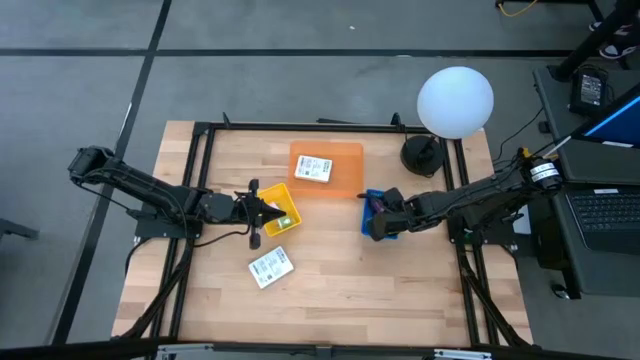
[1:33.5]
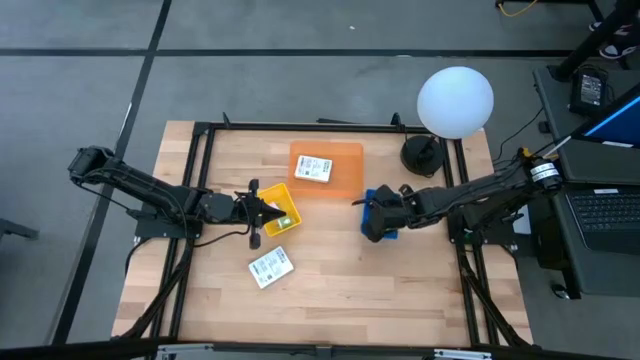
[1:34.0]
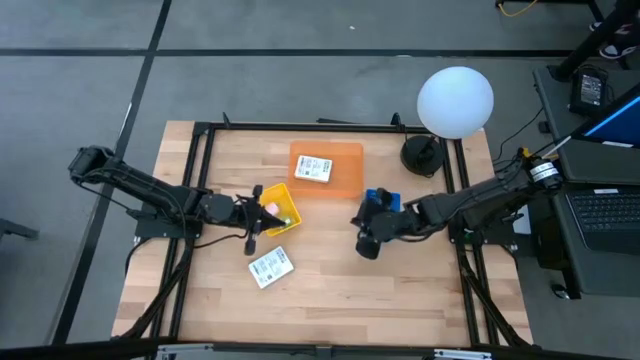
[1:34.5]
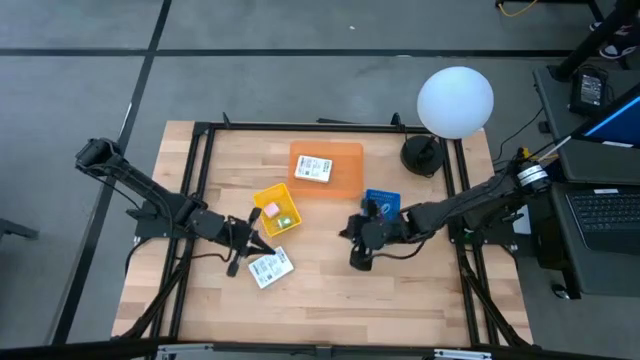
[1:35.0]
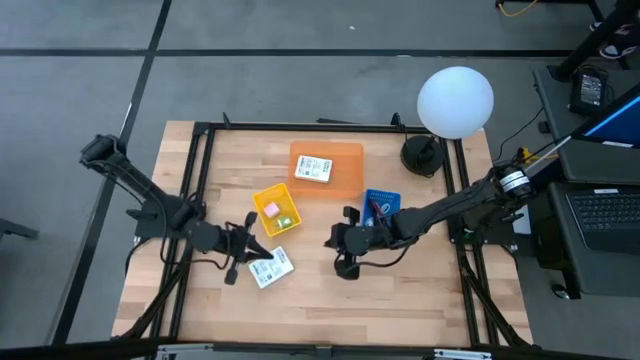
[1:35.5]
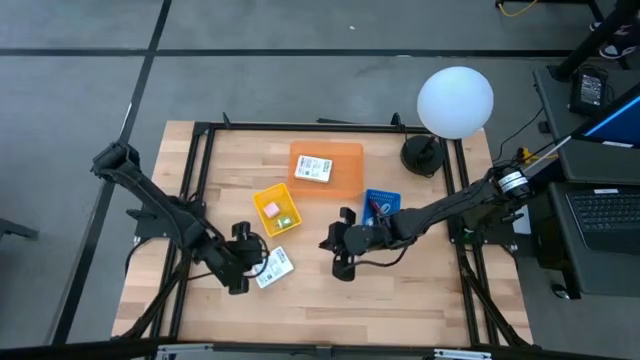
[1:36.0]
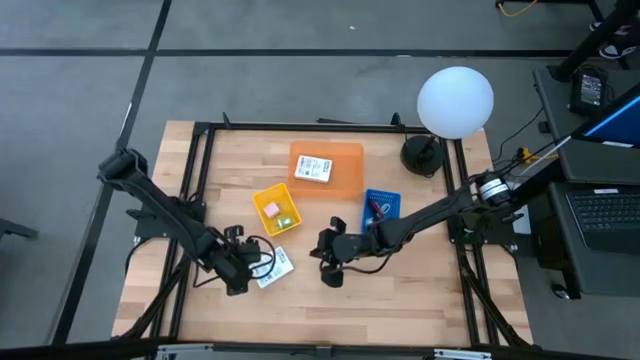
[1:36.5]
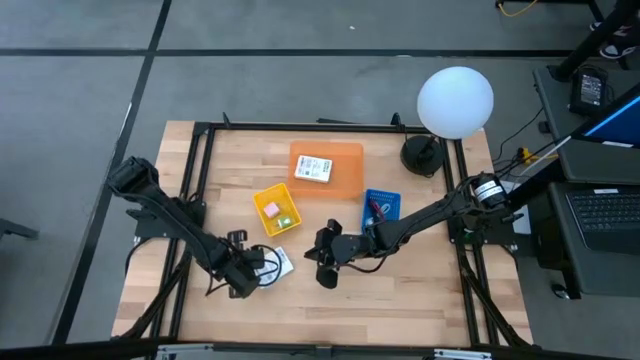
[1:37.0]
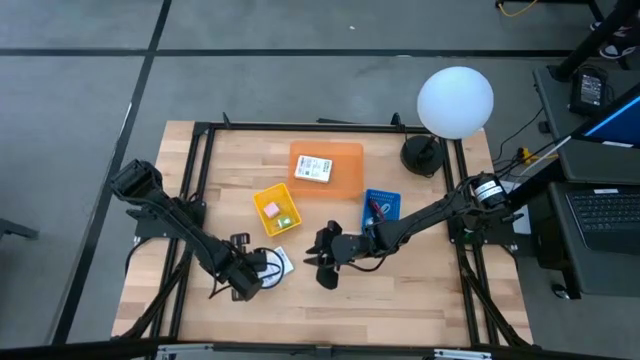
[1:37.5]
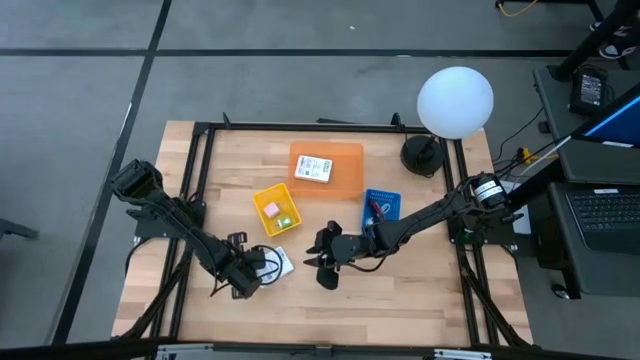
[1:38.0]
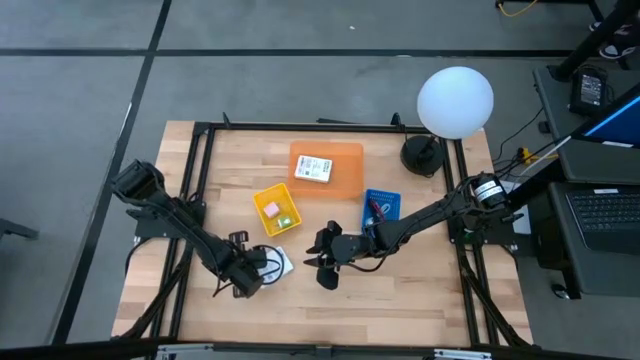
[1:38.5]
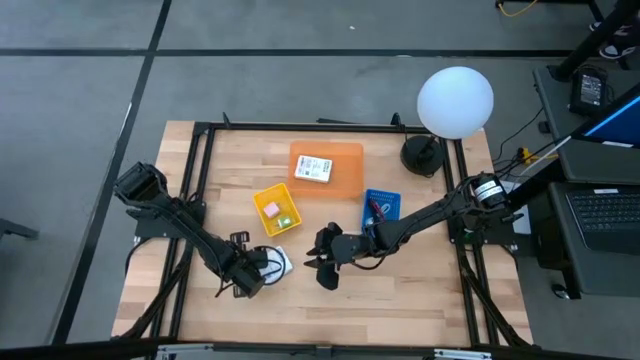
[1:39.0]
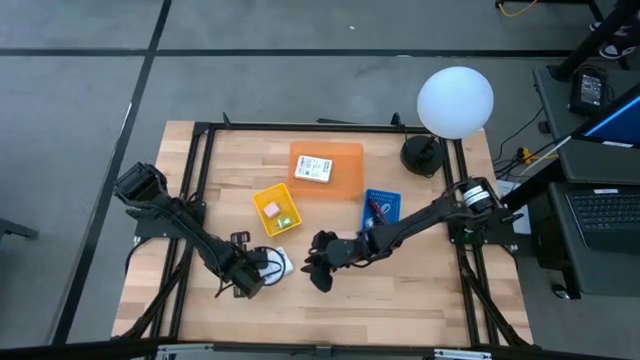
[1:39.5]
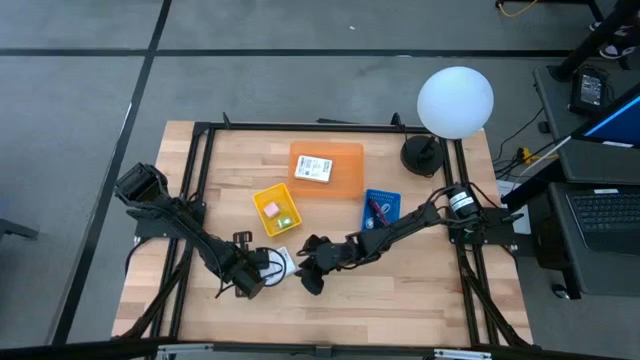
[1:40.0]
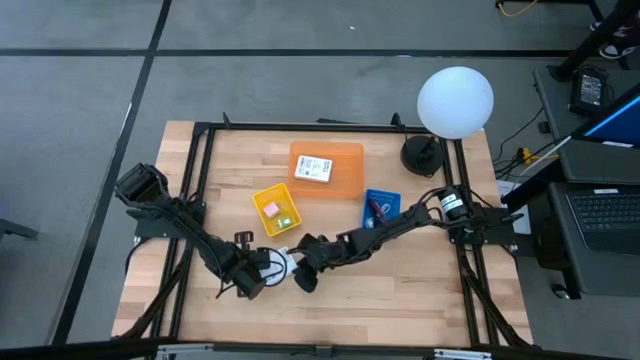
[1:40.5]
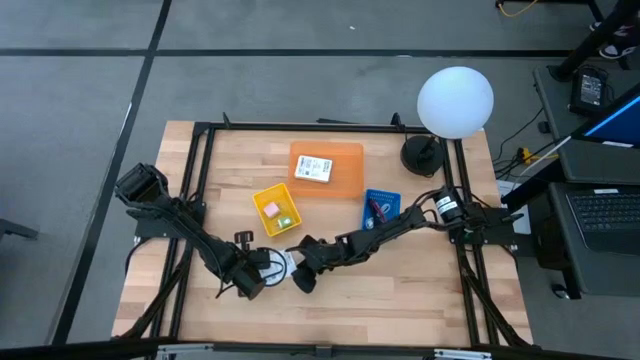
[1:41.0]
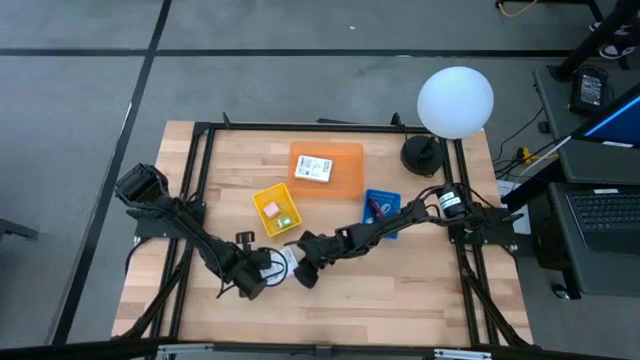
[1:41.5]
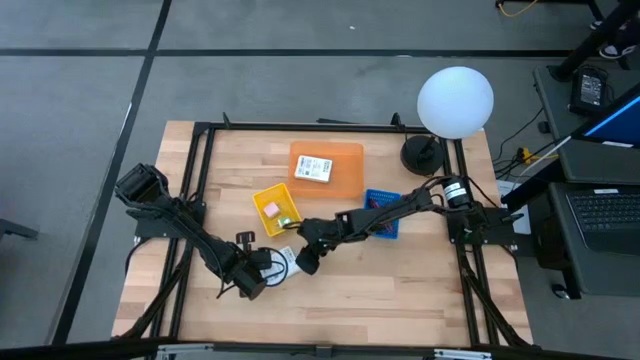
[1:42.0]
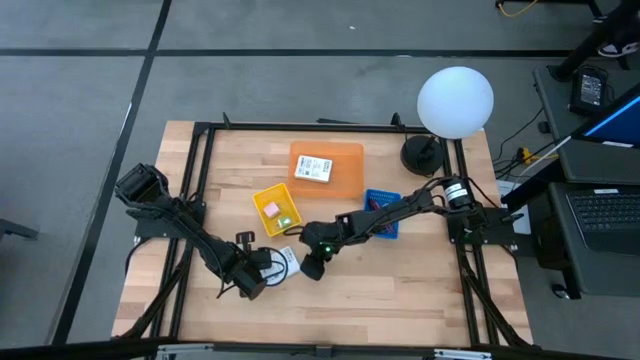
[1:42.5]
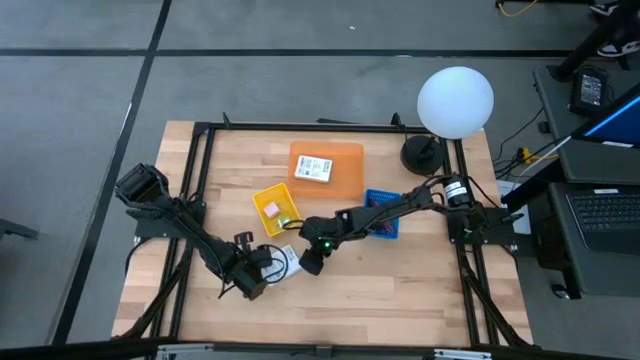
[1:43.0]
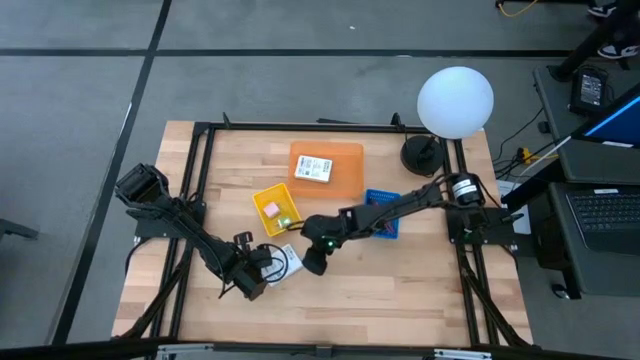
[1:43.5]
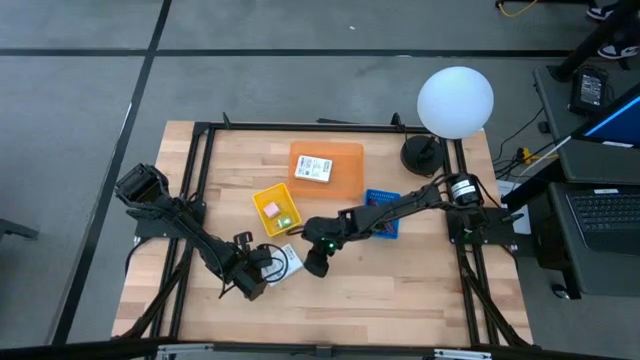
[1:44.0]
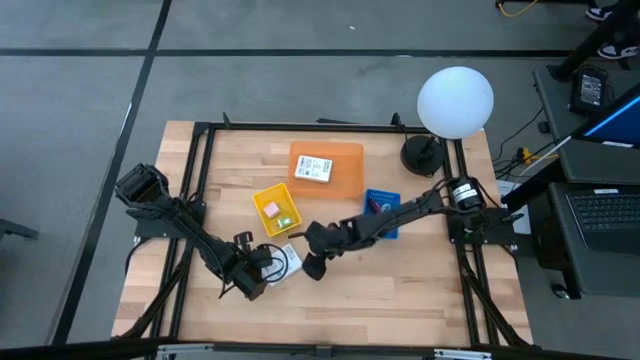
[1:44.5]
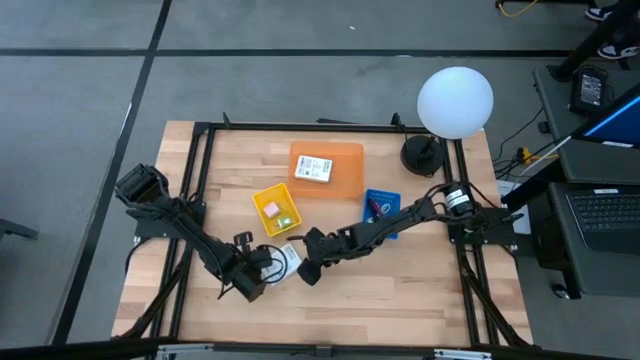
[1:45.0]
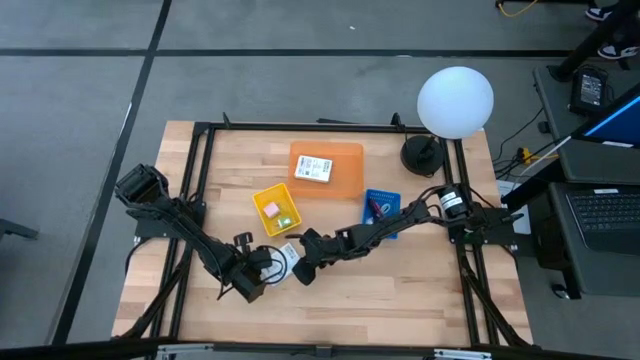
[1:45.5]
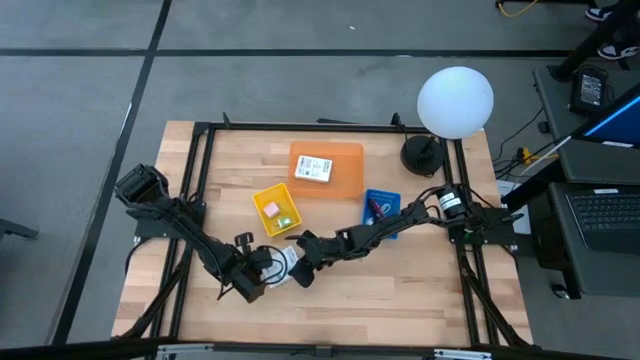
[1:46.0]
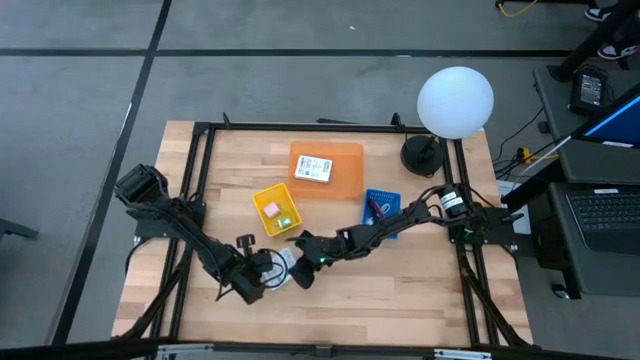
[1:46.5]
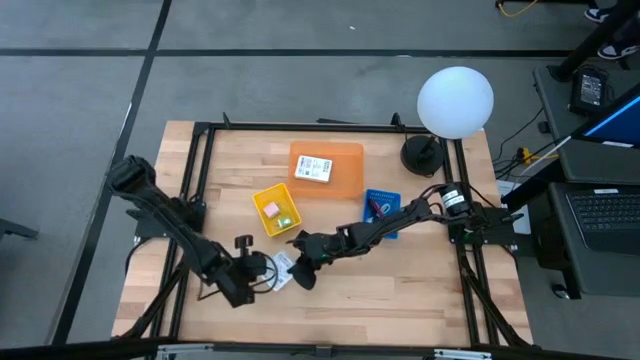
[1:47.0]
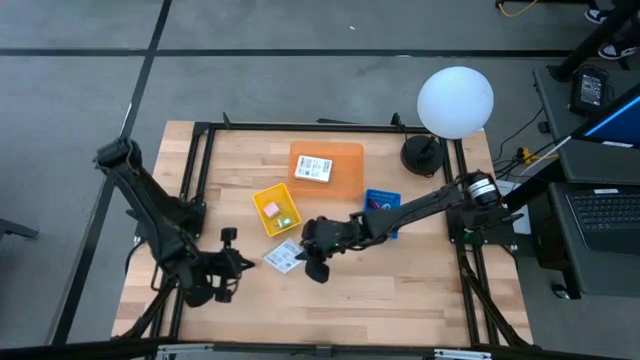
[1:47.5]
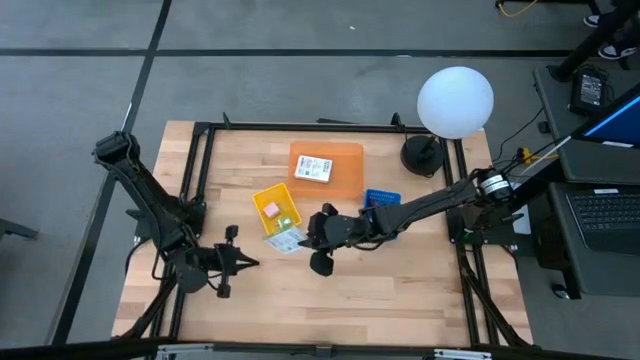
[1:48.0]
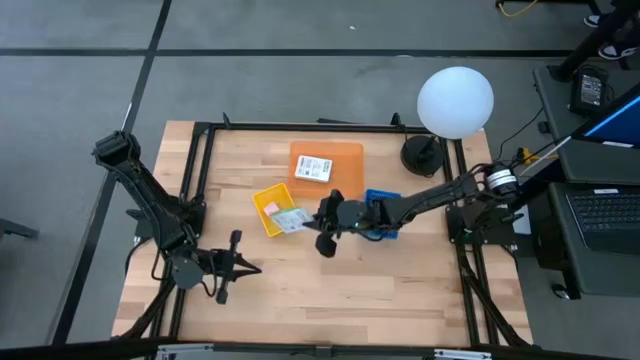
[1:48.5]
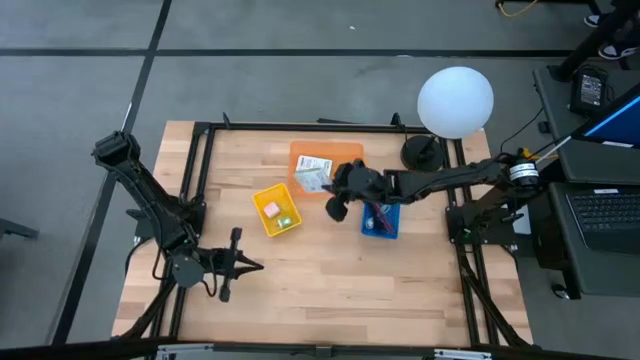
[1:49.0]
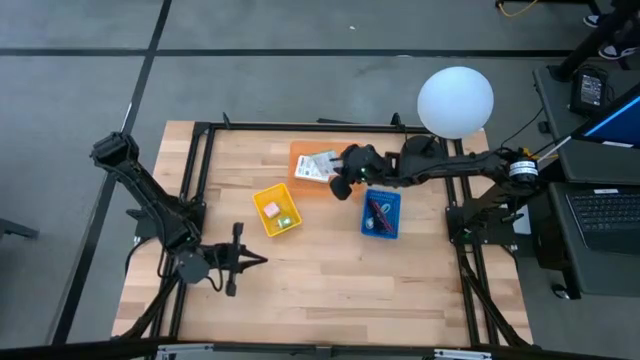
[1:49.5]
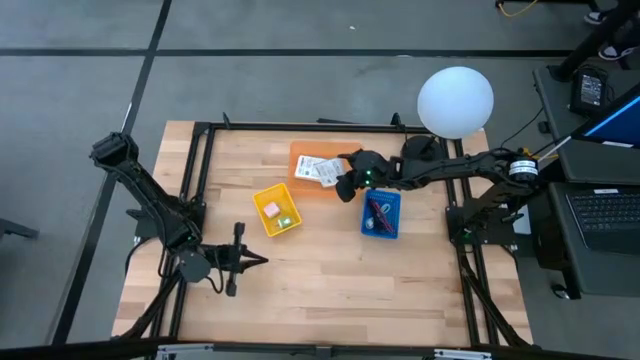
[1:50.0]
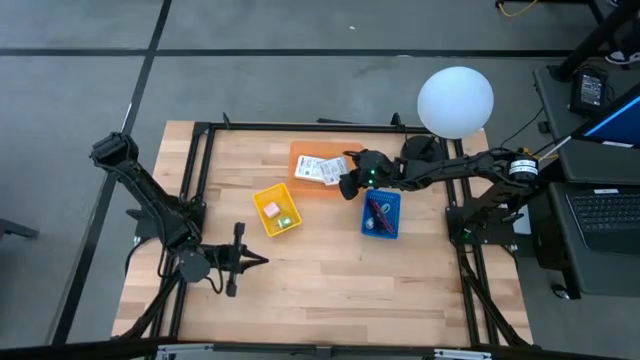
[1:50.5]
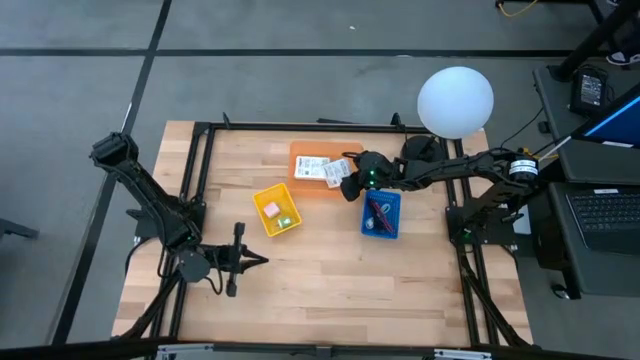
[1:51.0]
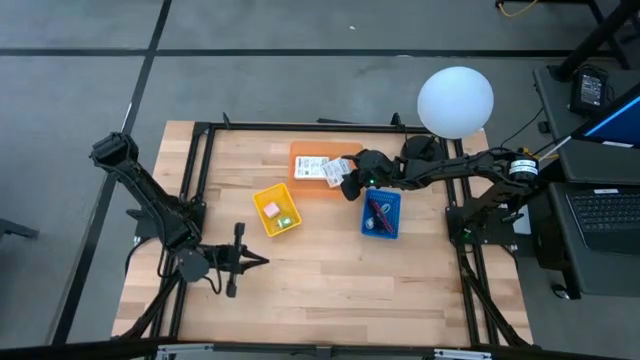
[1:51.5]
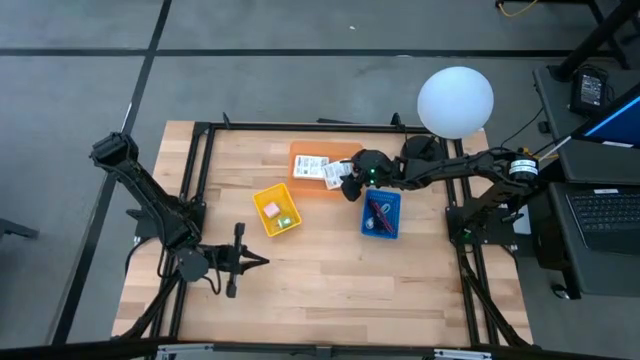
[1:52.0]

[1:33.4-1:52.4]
Task: Pick and place items into bin
Put the card reader box into the orange bin

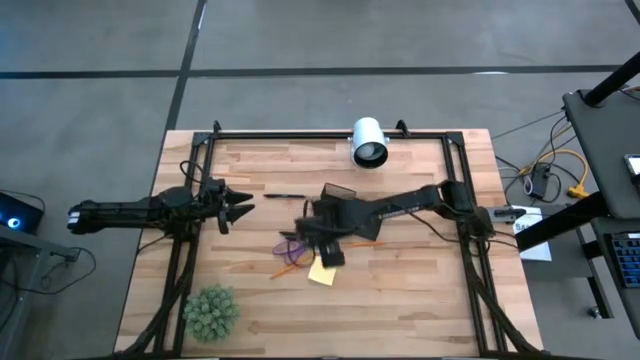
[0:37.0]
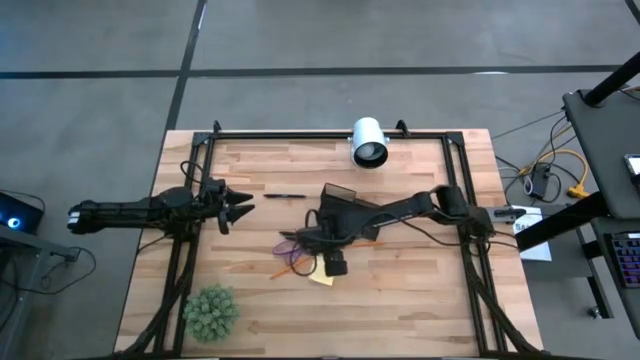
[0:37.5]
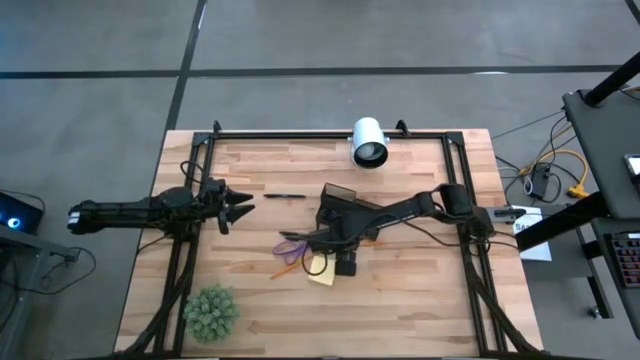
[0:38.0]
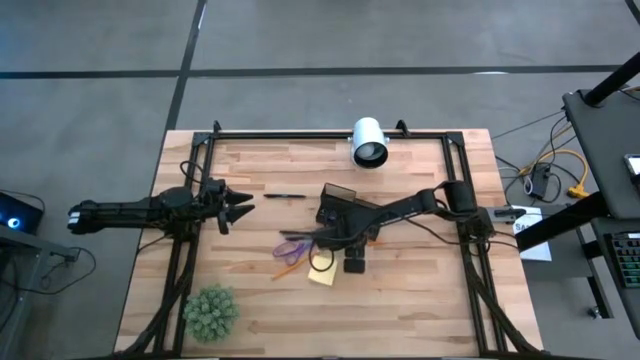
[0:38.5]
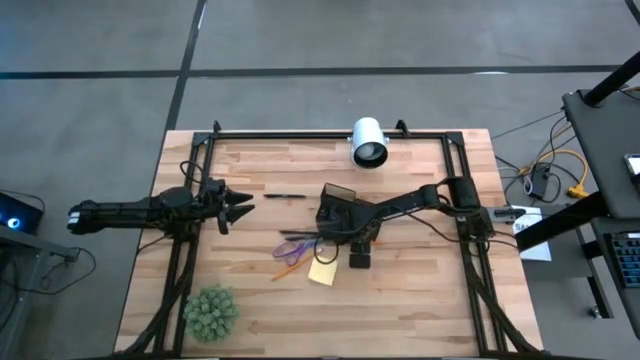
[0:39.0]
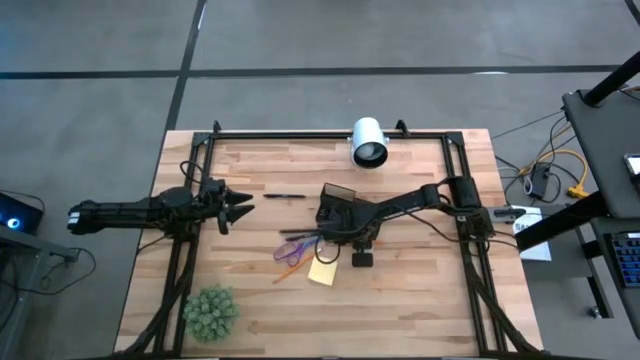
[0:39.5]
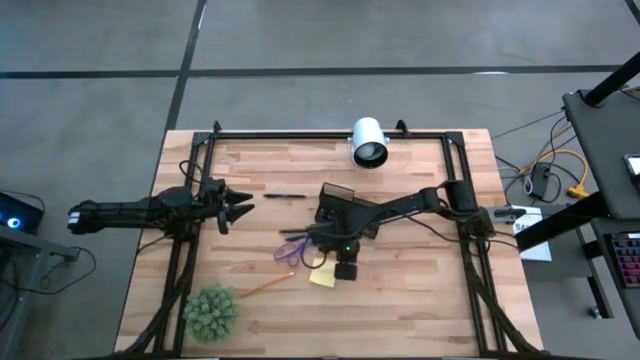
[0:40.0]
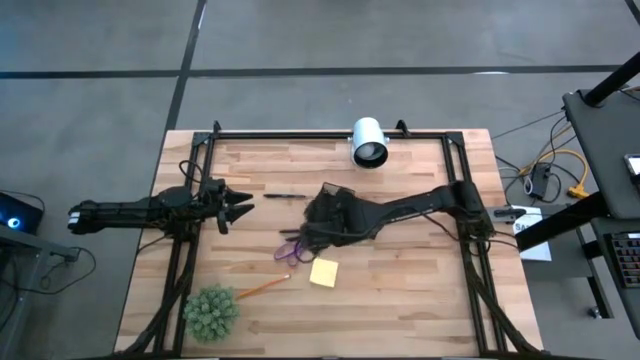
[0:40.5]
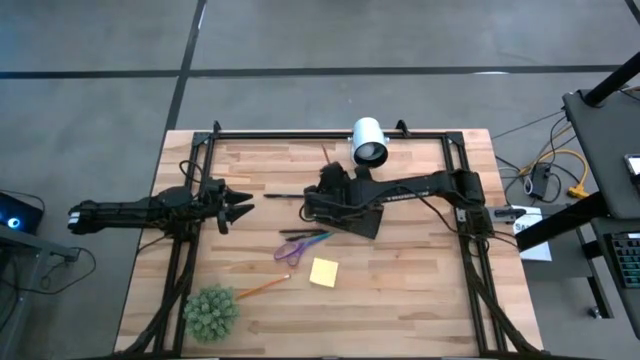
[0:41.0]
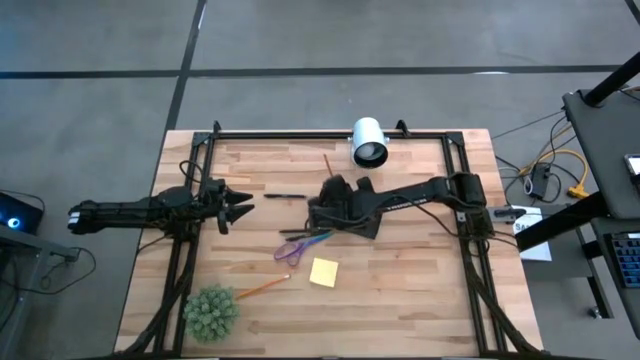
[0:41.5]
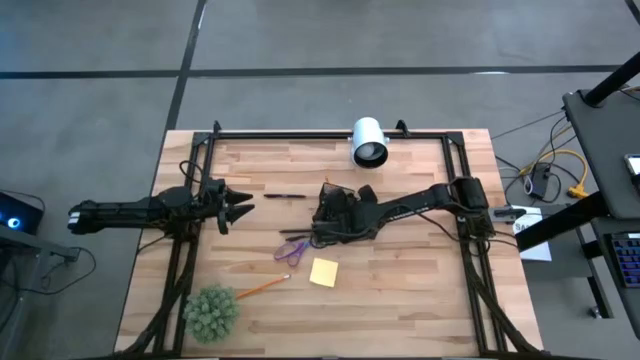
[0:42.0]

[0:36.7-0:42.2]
Task: Pick and place office supplies into organizer
Put the right yellow pencil into the black mesh organizer
